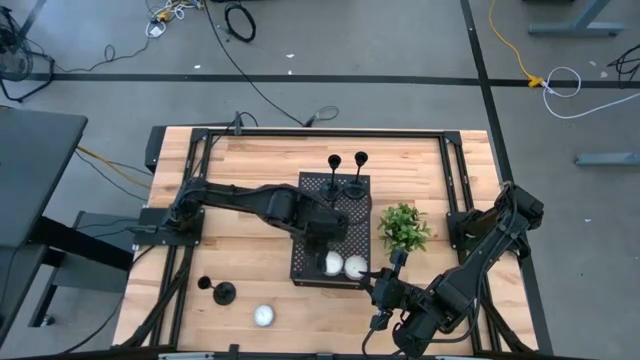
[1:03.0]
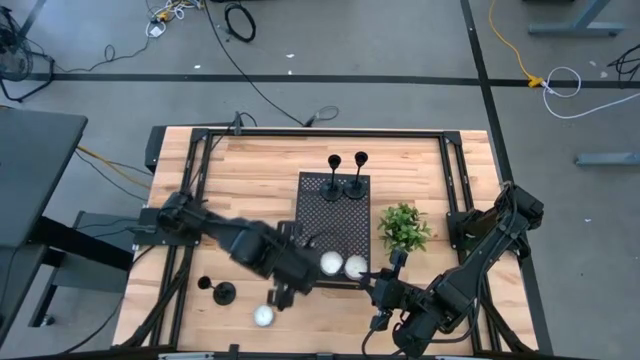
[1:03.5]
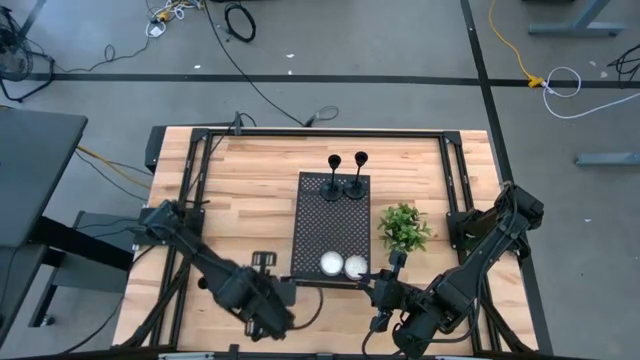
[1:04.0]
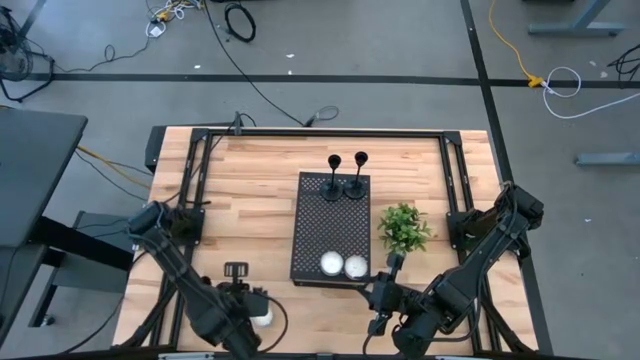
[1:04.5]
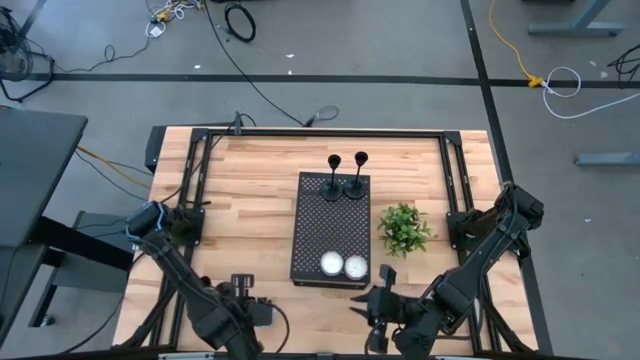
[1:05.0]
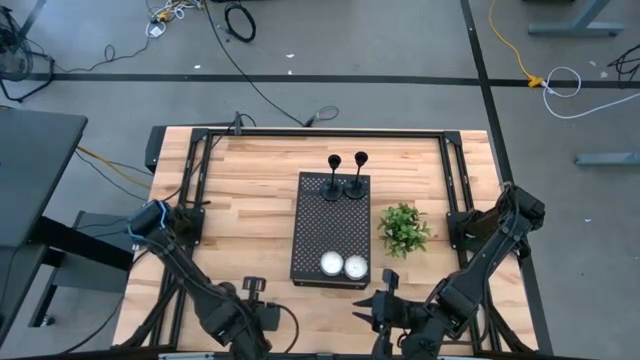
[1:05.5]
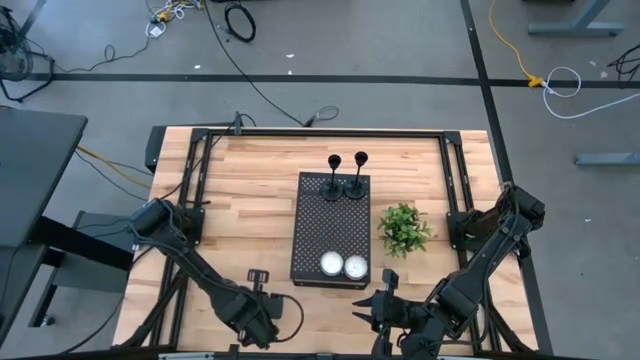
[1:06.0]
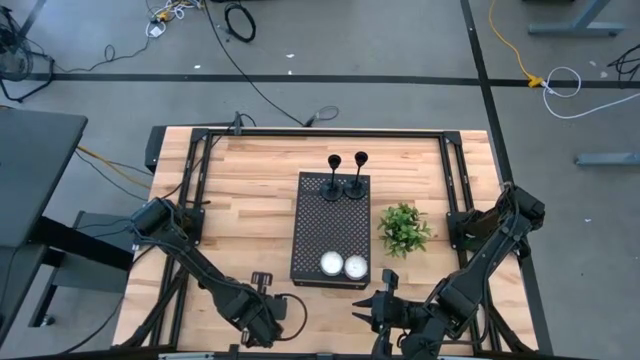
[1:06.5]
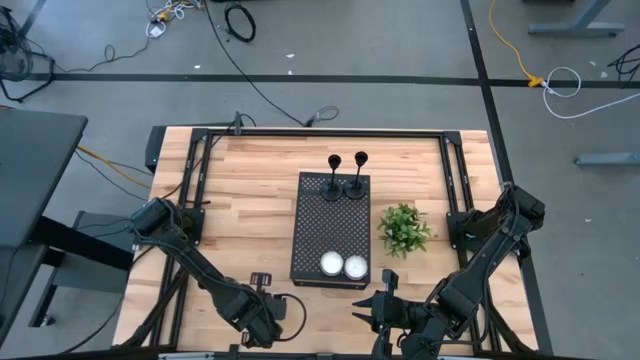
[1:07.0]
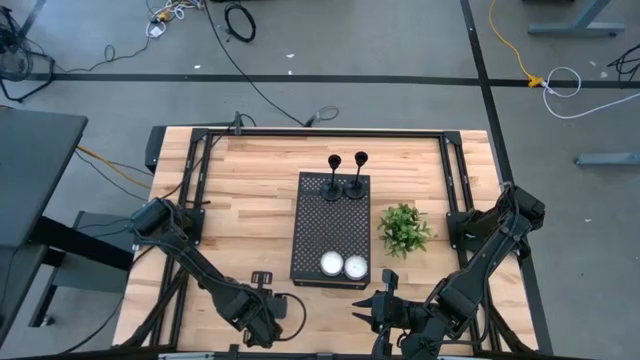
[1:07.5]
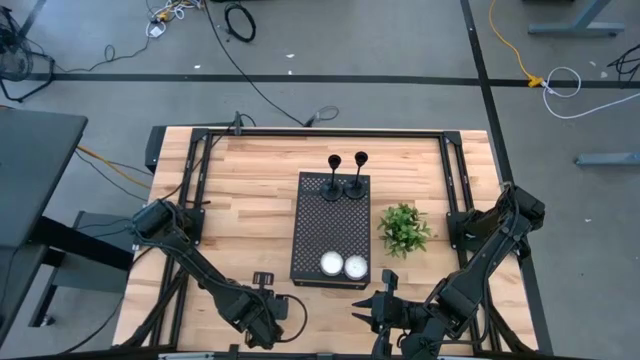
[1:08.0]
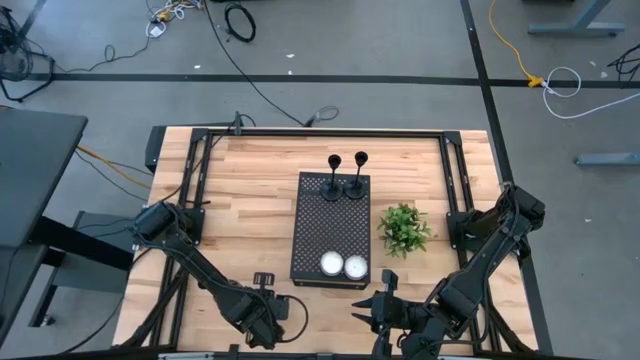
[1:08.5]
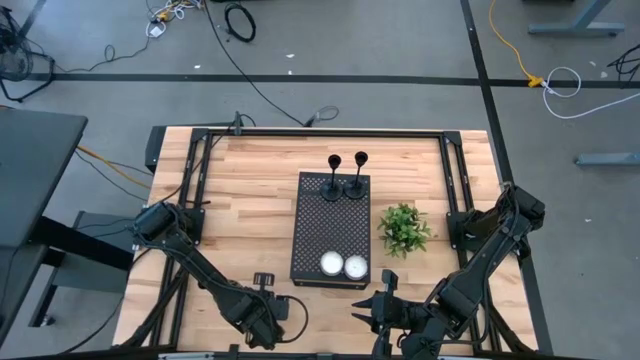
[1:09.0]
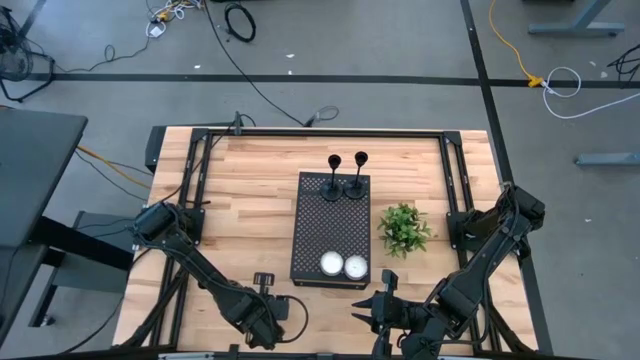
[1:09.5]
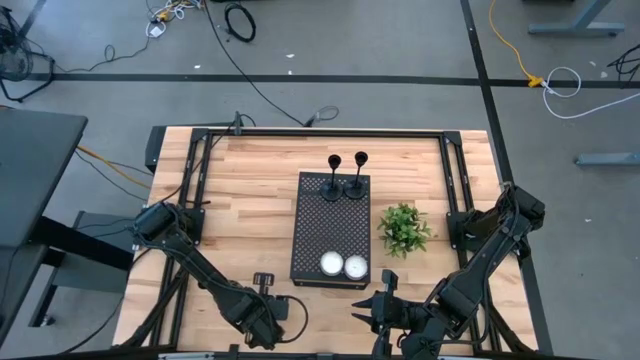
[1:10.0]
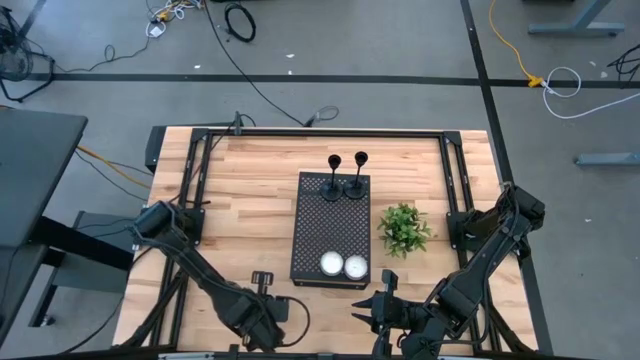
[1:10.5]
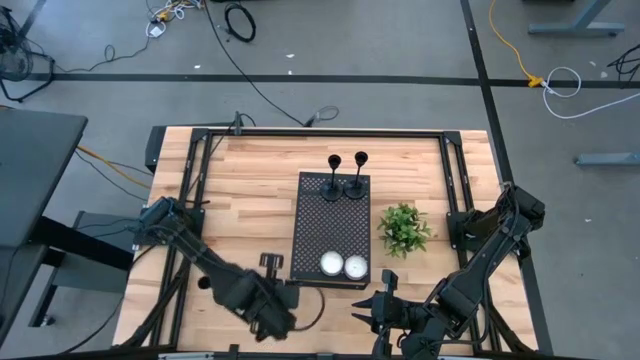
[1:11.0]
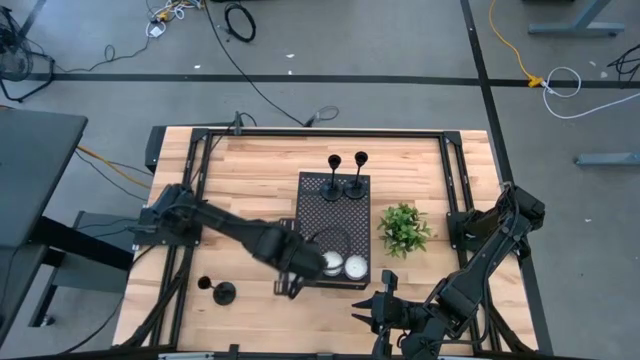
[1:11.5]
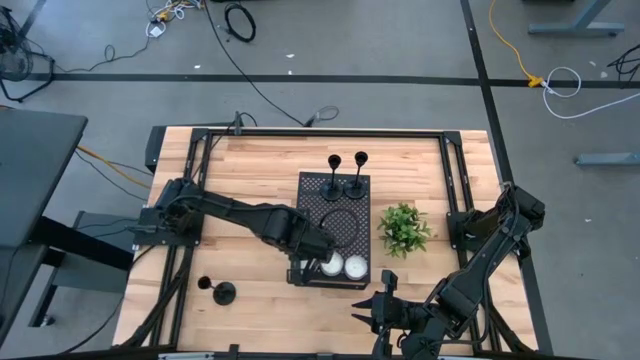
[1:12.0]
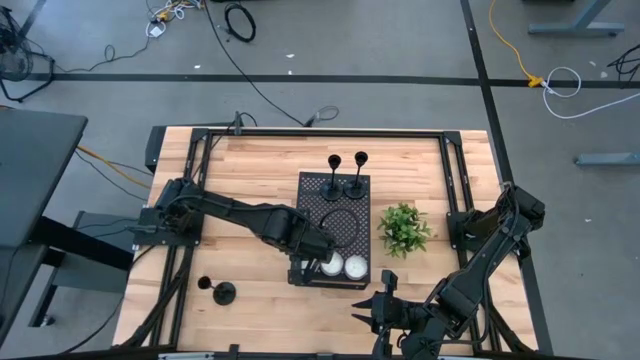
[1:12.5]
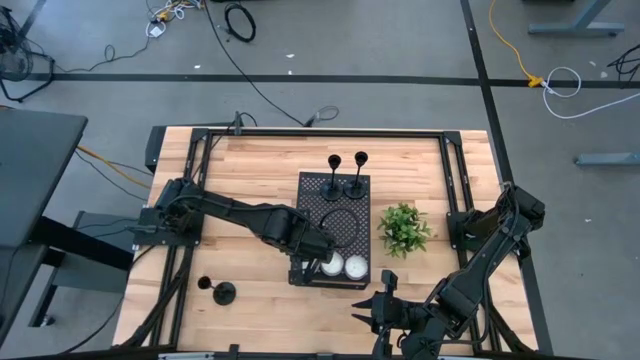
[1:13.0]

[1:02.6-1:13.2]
Task: Pick & Place candle stick holders
Put the white candle on the shelf aligned with the other white candles

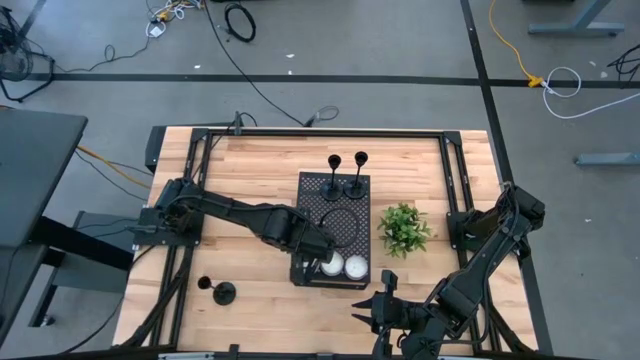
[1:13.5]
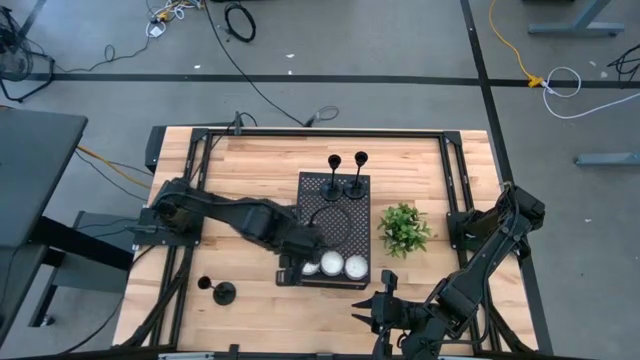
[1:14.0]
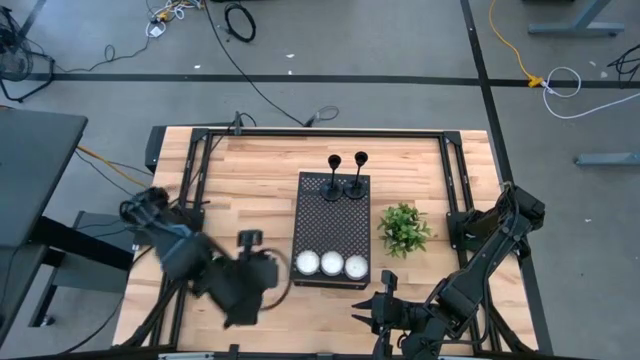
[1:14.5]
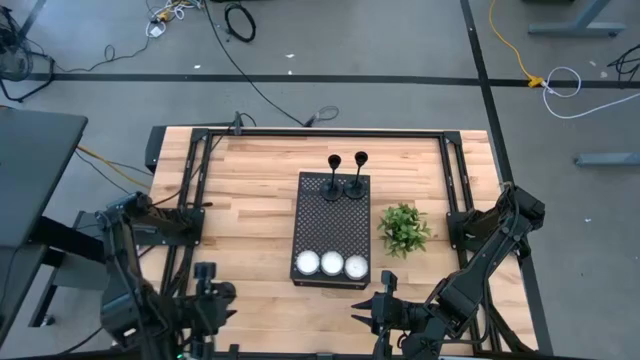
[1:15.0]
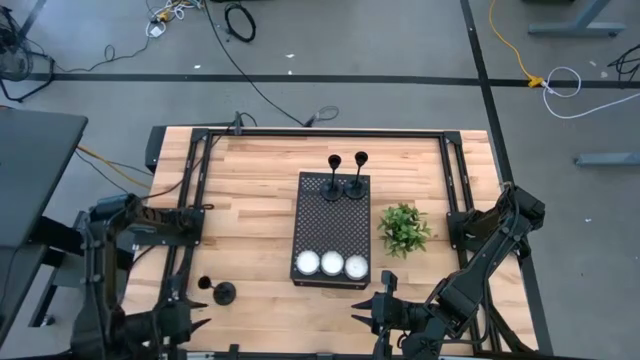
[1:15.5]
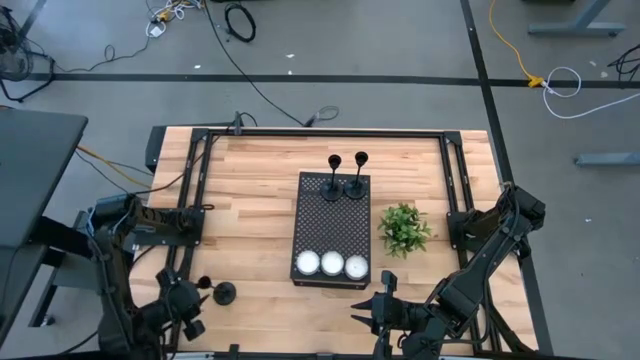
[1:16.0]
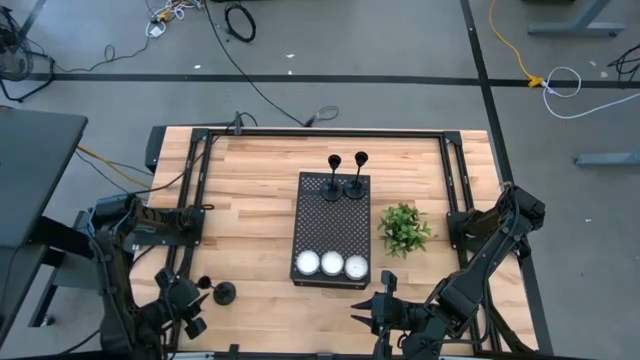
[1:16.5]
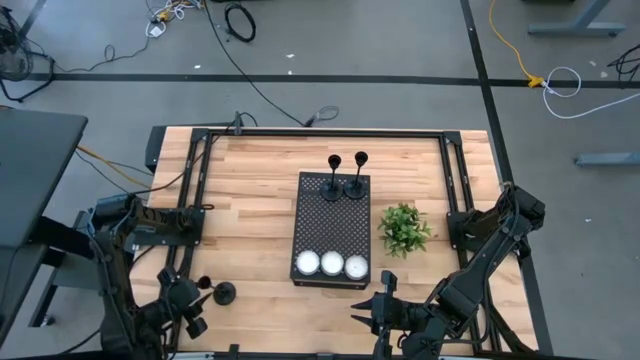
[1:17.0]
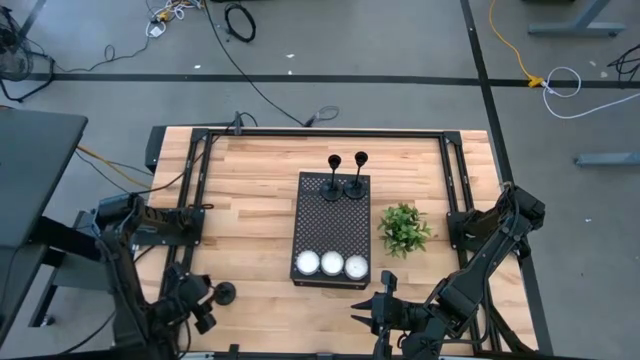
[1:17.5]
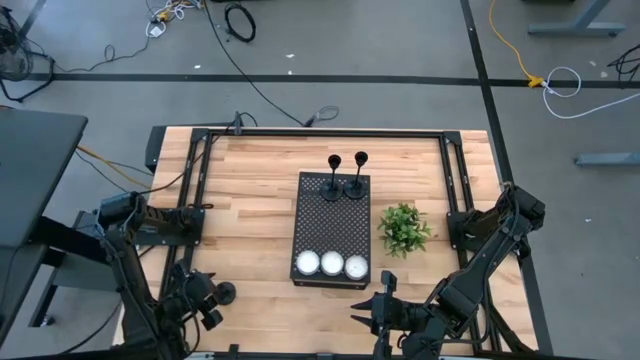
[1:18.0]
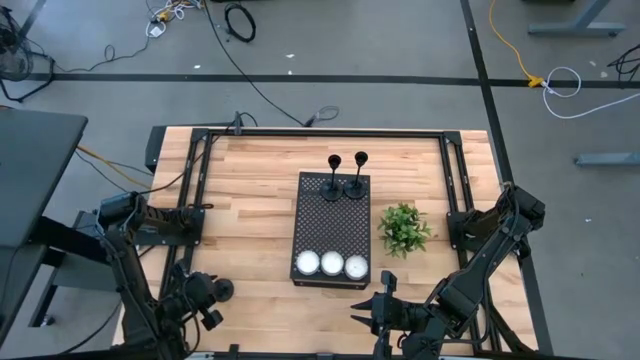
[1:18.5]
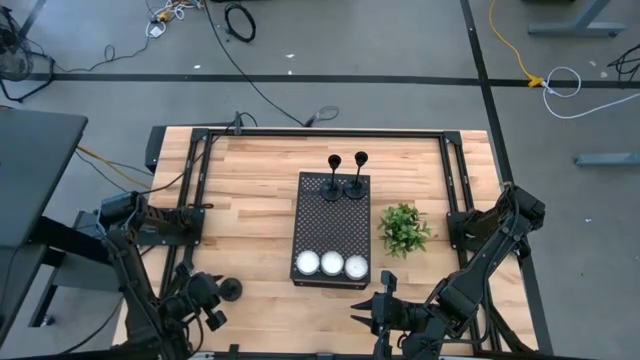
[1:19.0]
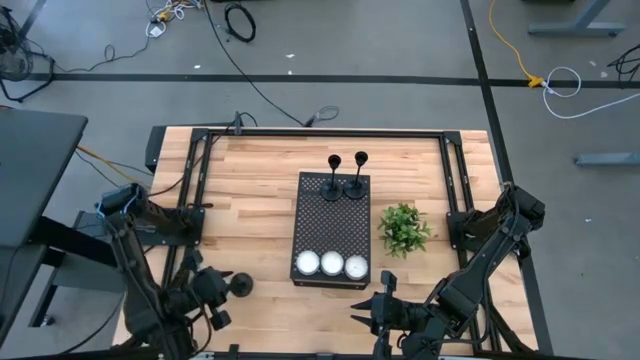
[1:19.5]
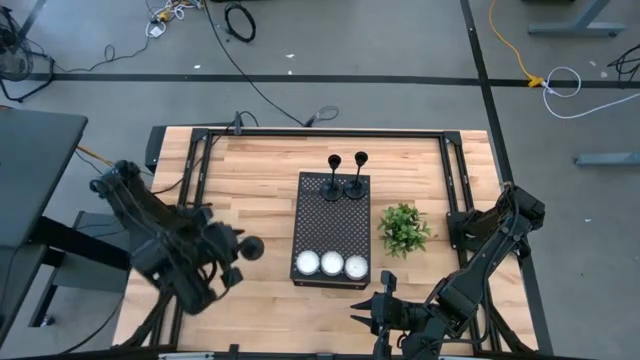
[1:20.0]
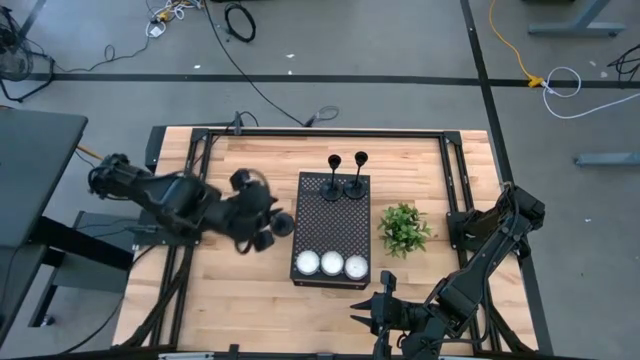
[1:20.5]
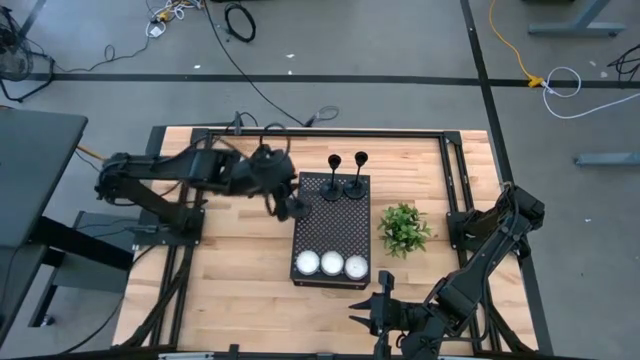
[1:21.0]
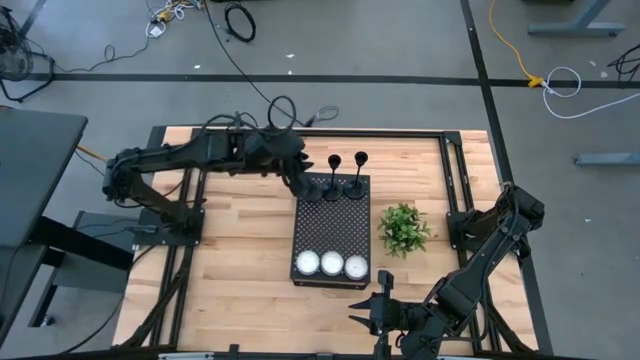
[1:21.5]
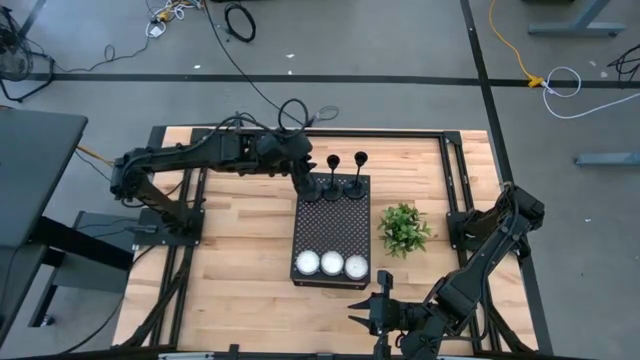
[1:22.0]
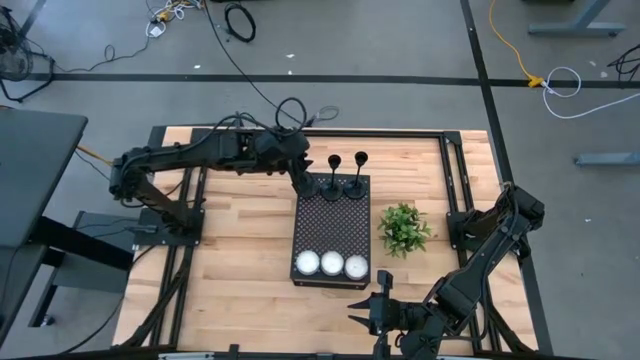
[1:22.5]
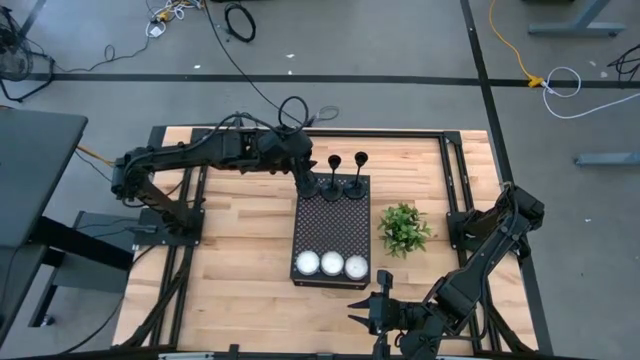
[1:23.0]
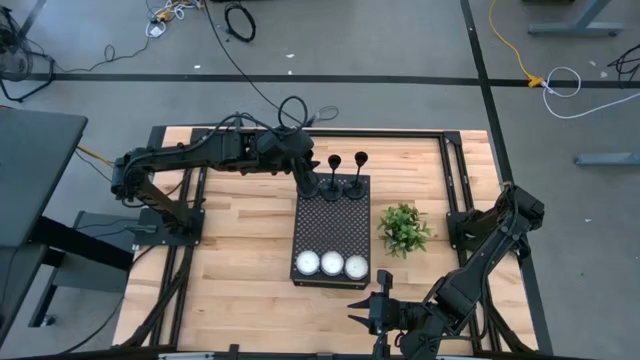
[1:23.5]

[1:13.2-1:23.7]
Put the black candle holder on the shelf aligned with the other black candle holders
